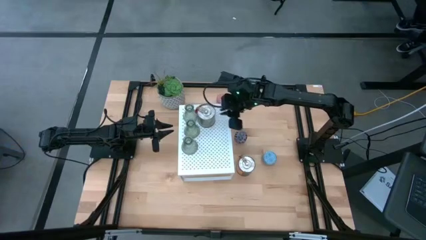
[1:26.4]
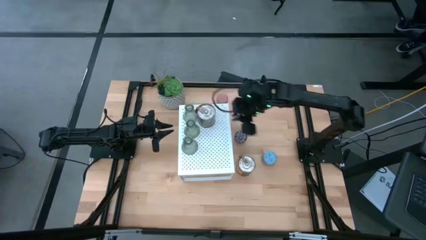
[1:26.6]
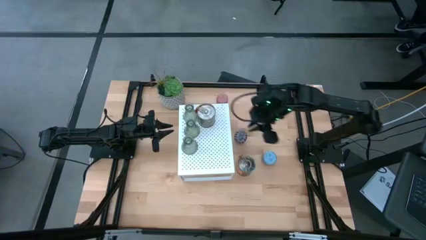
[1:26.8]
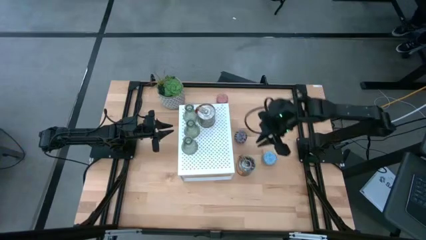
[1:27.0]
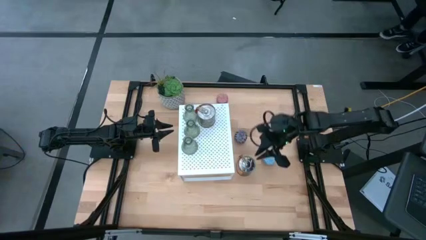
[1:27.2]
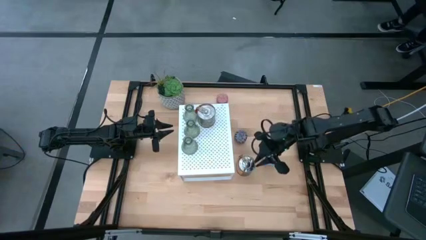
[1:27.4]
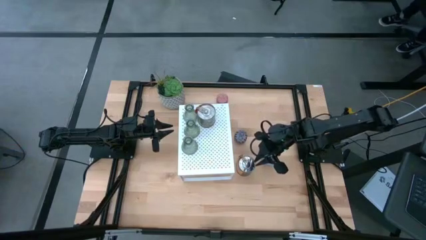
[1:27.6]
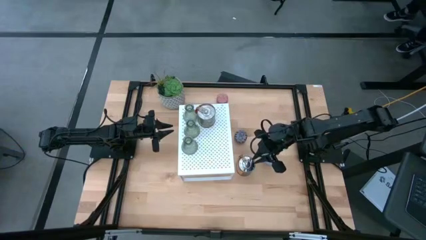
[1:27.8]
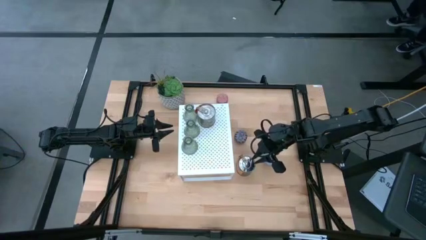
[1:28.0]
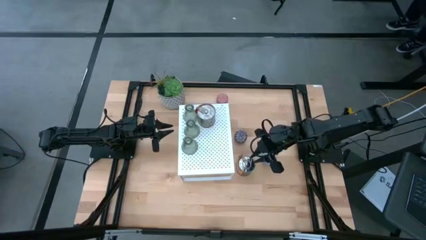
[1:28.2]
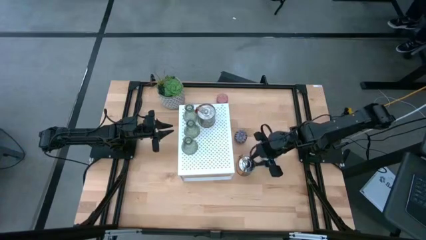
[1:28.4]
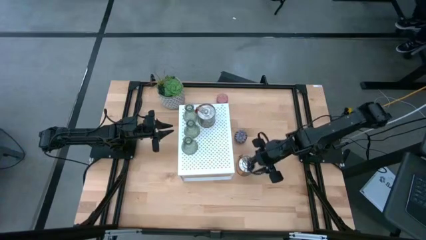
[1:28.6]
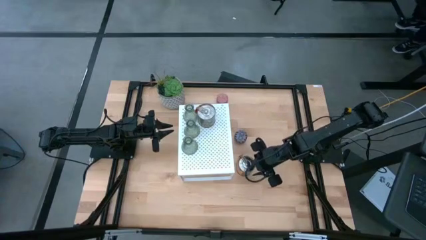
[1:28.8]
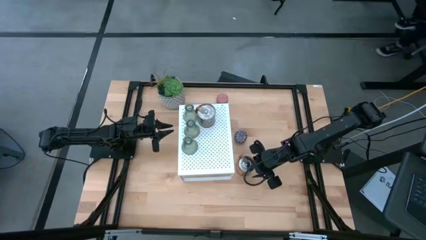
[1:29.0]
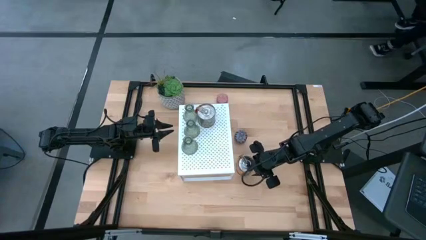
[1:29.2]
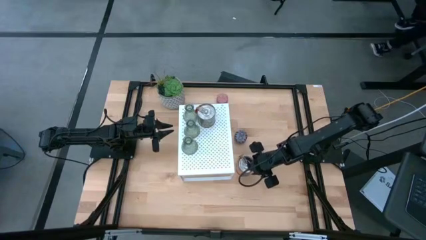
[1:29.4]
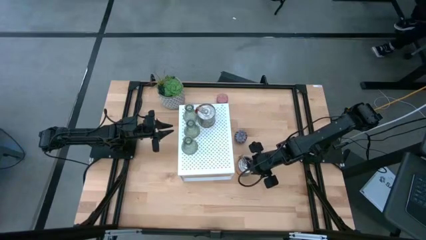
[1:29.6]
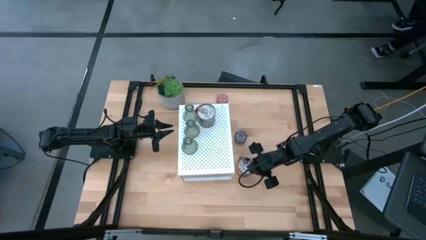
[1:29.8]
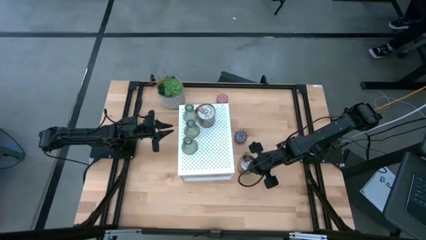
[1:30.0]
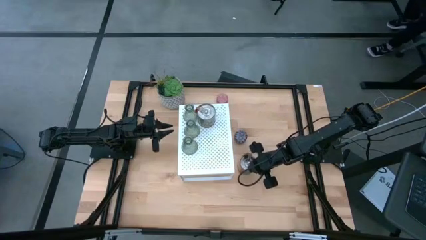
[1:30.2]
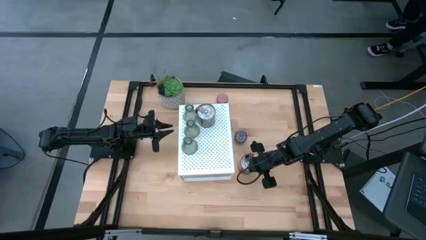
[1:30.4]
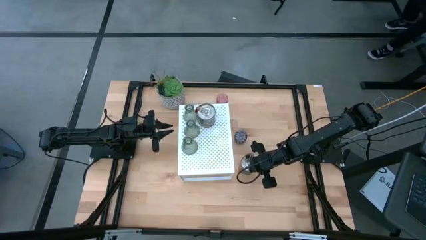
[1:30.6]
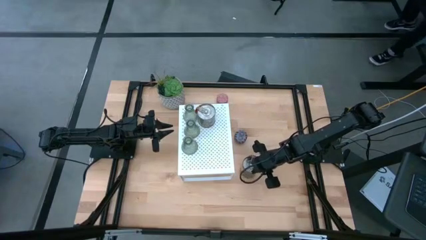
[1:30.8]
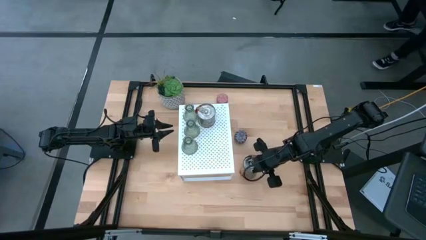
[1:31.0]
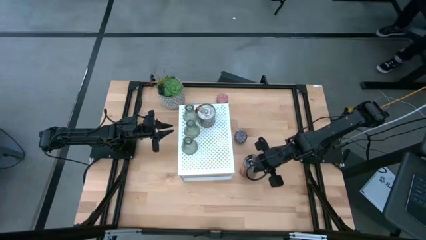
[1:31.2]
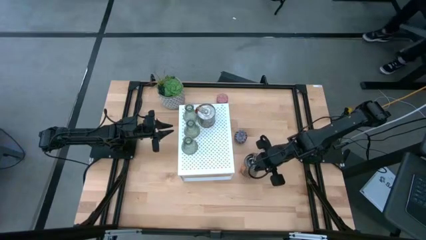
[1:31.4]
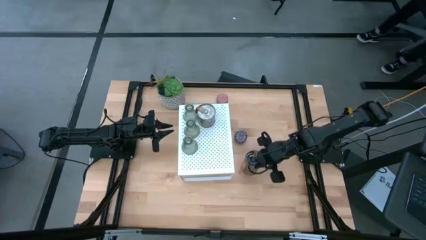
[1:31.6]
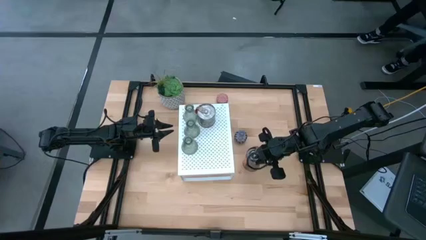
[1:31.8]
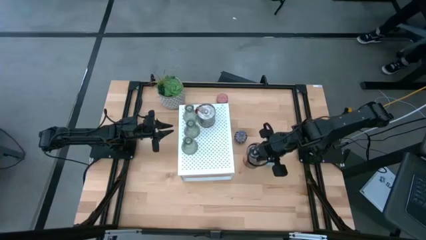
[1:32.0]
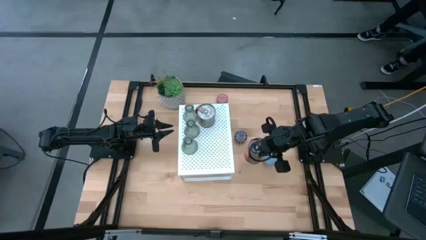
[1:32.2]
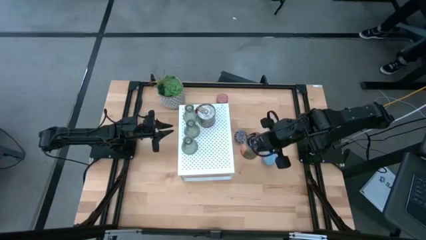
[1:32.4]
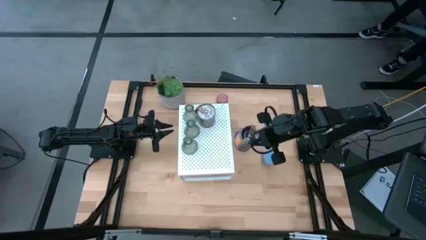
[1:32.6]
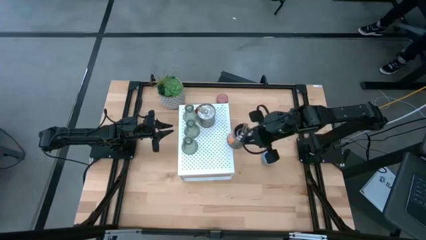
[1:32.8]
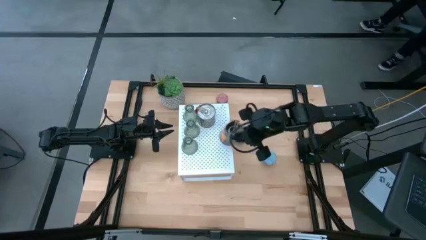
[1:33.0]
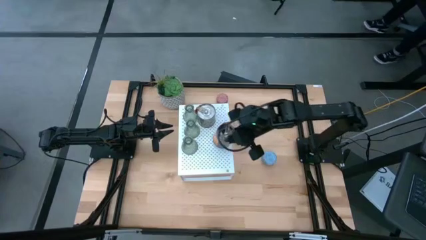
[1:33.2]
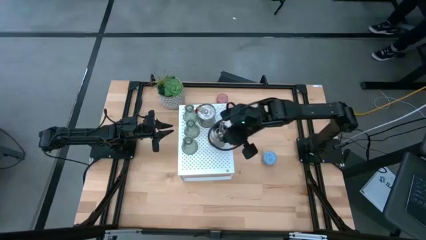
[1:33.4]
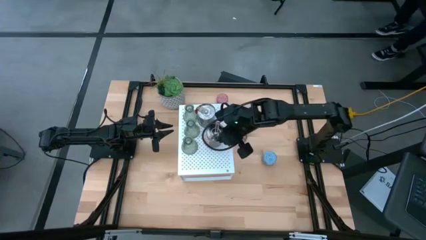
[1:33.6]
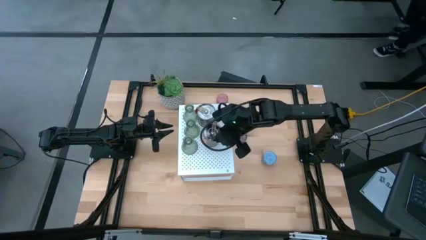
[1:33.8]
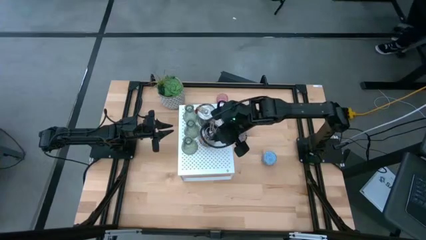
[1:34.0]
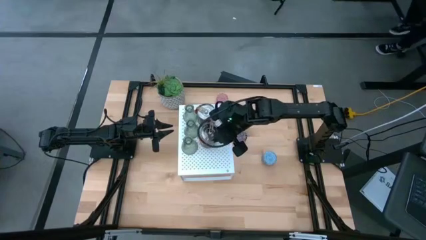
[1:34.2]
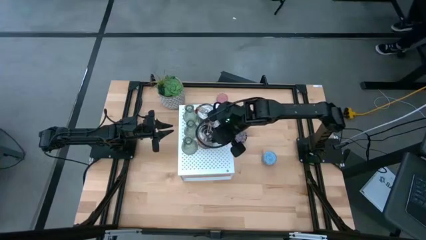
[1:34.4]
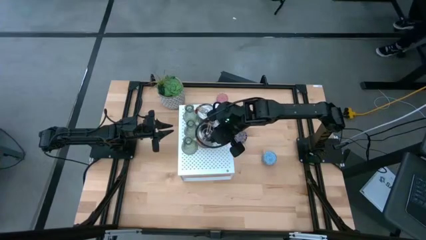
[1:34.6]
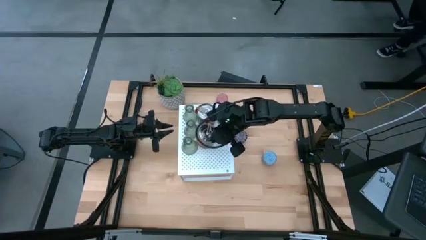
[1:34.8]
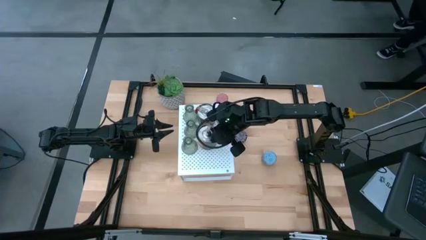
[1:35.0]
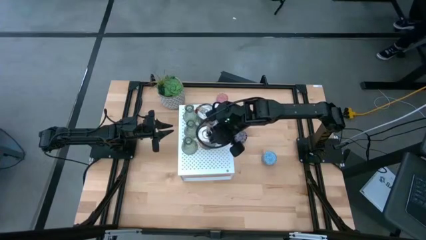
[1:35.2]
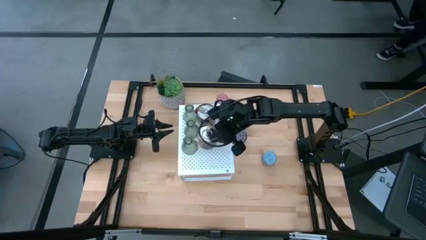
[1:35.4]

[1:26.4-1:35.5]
Task: Pick & Place candle stick holders
Align the orange scented candle with the other orange scented candle on the shelf

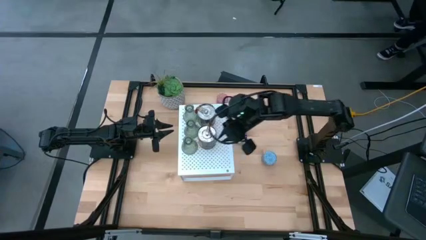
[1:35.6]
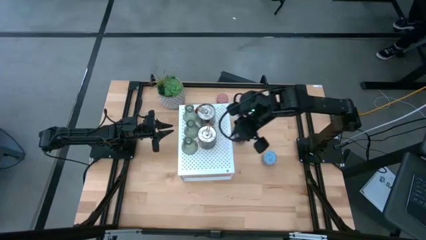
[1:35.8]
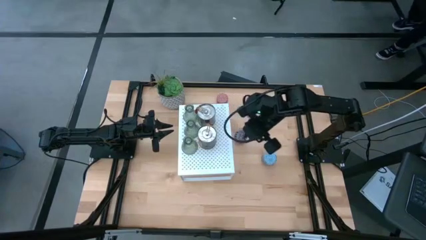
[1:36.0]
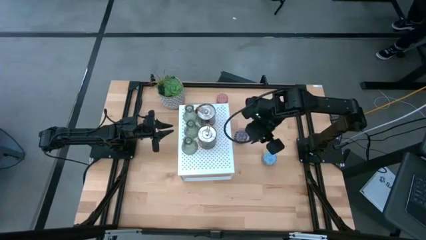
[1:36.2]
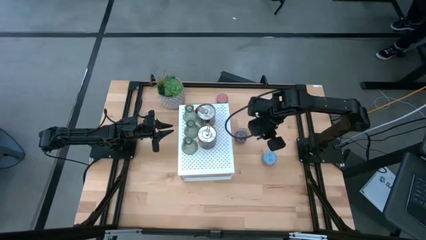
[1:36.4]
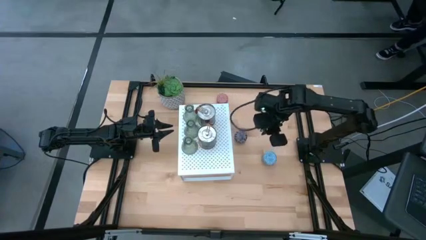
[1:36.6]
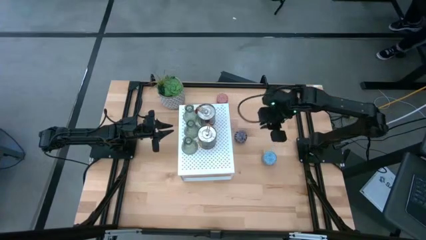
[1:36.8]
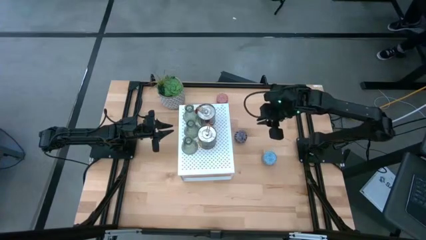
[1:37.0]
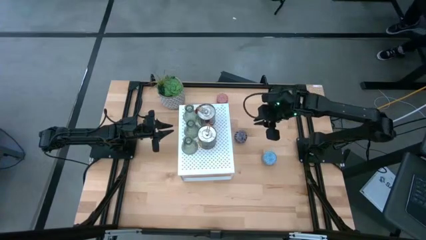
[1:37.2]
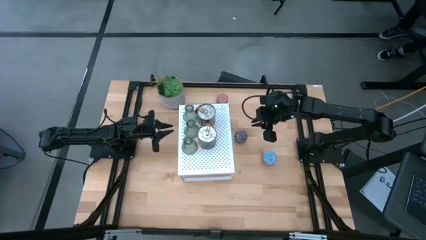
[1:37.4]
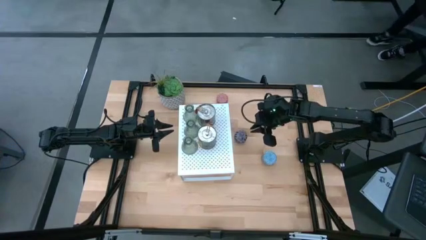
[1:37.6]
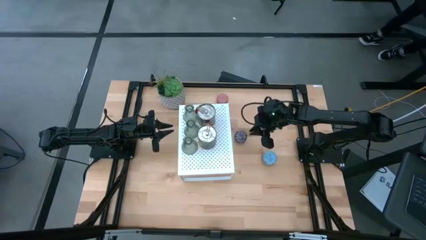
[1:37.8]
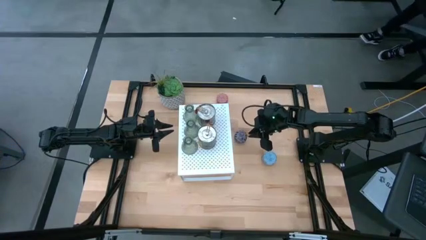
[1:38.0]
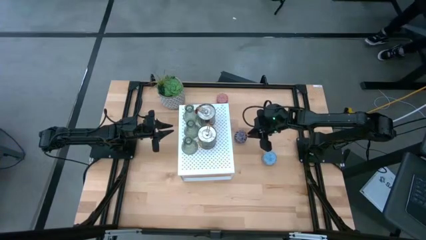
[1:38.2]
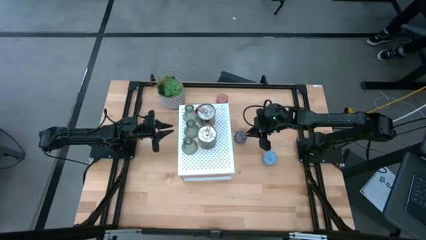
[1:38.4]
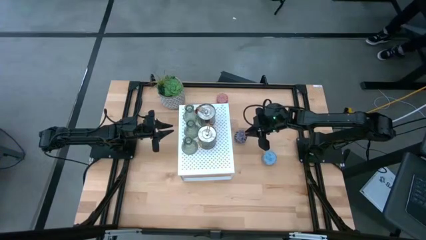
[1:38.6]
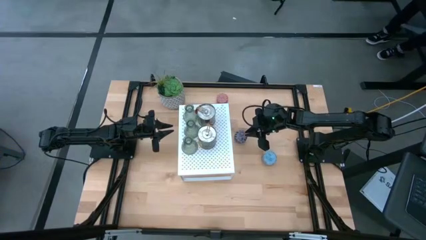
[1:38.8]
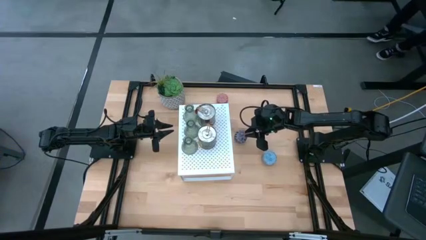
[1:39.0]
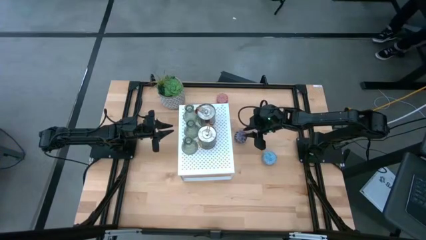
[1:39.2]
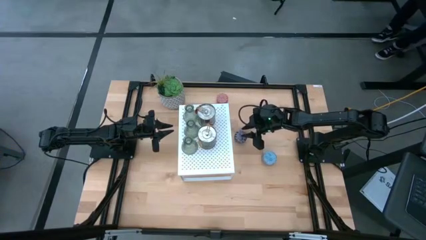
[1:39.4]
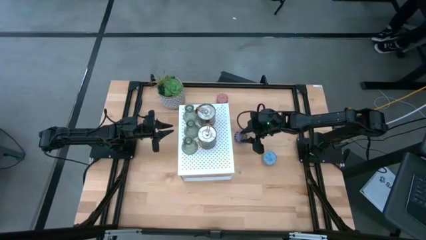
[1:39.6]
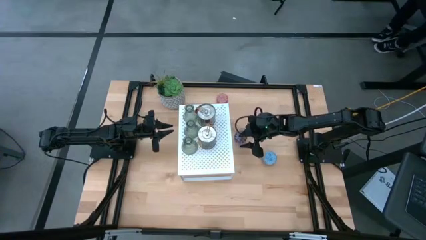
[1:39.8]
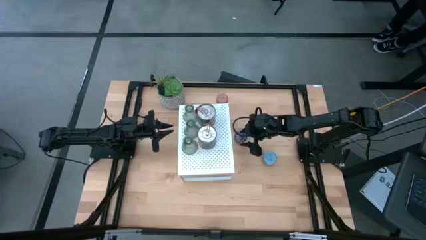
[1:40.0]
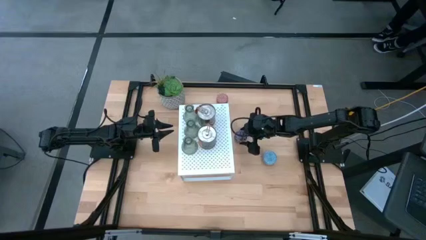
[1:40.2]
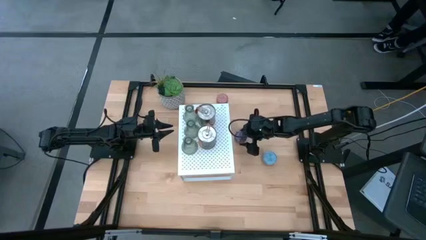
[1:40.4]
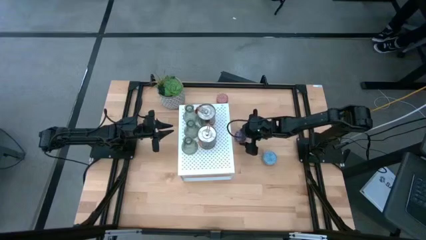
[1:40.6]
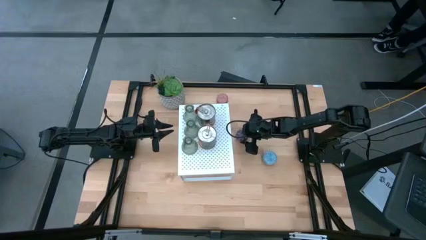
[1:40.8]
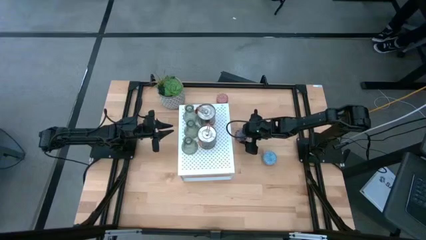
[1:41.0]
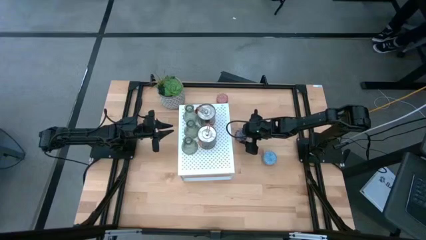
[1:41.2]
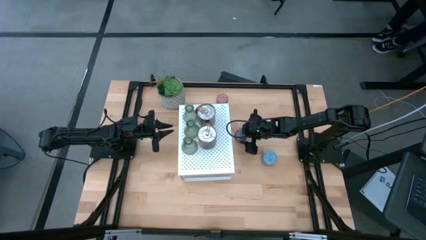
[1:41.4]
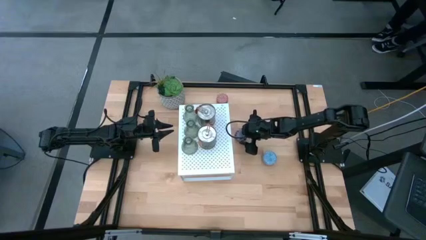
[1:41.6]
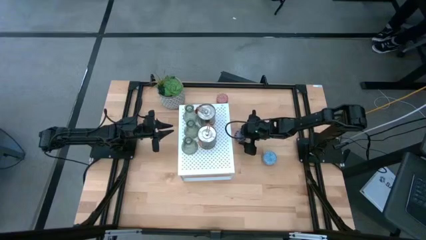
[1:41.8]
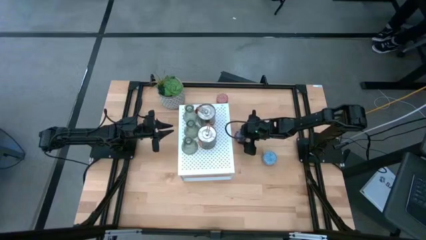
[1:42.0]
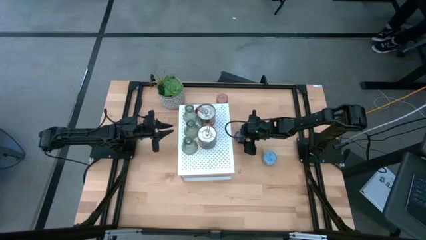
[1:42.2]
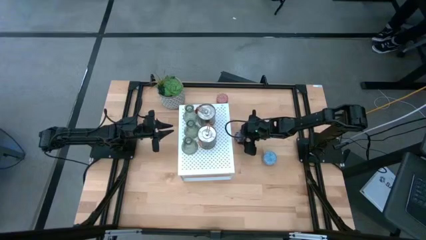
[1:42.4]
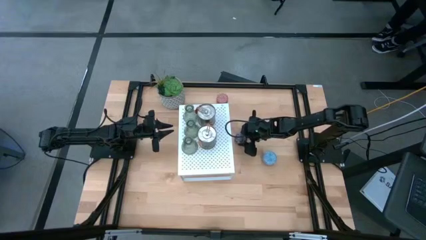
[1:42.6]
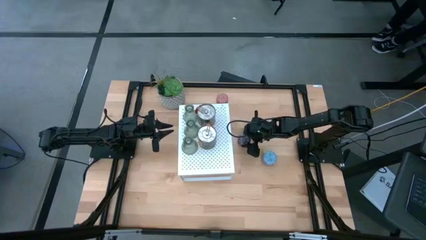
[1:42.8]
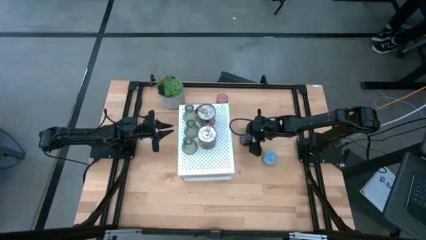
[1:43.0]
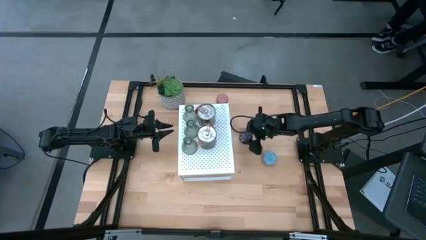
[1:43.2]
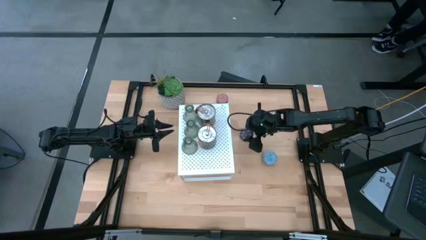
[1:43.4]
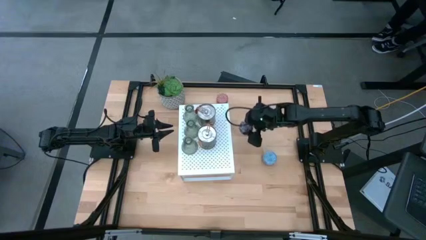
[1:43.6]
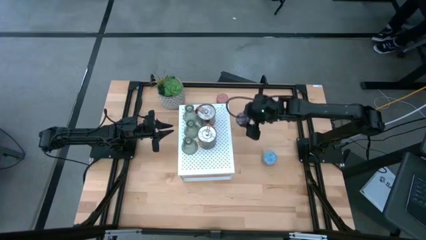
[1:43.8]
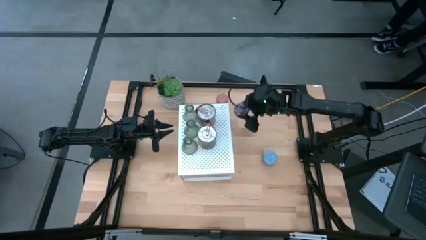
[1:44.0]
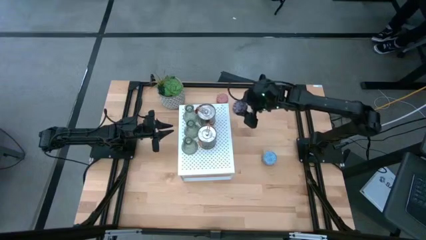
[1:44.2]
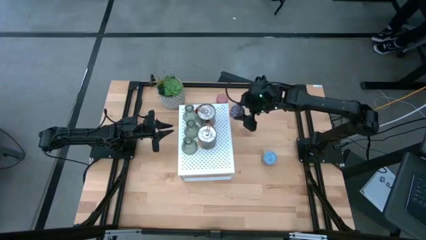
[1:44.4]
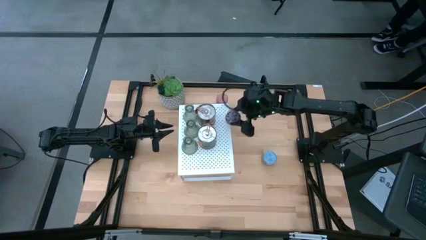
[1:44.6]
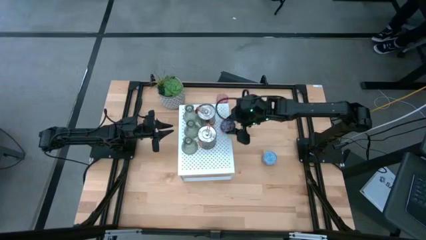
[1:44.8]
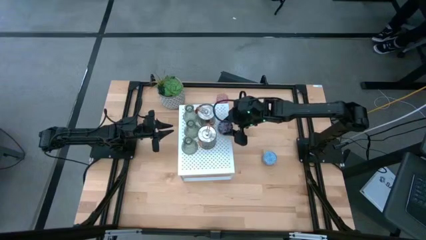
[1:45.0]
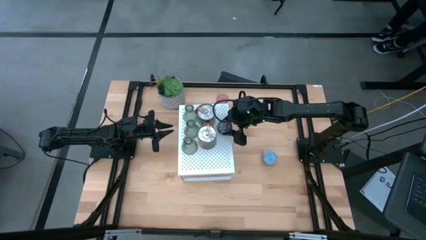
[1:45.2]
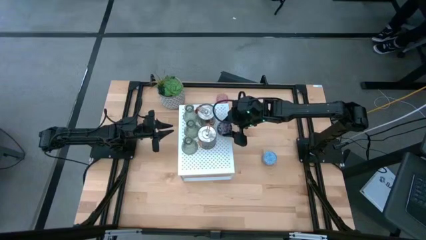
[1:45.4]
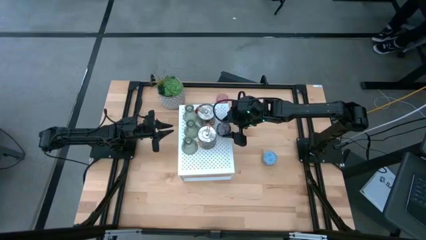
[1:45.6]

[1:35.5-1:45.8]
Put the black patterned scented candle on the shelf
